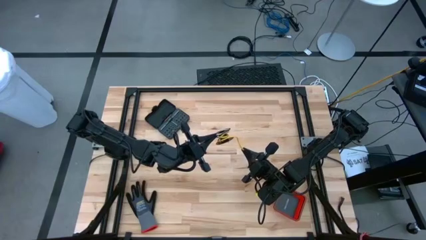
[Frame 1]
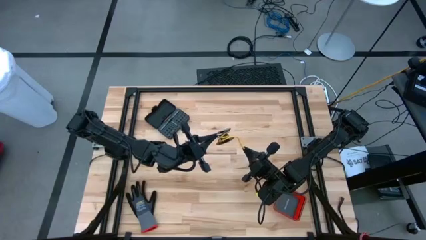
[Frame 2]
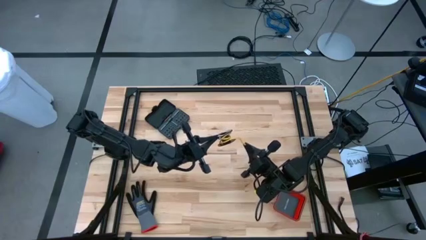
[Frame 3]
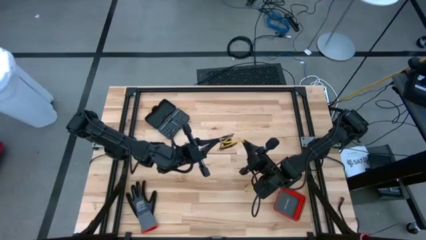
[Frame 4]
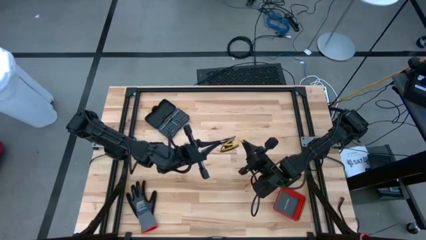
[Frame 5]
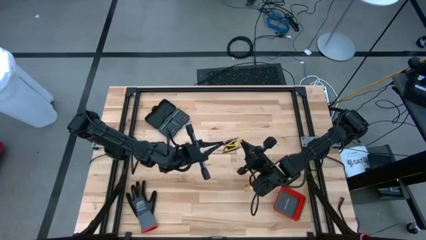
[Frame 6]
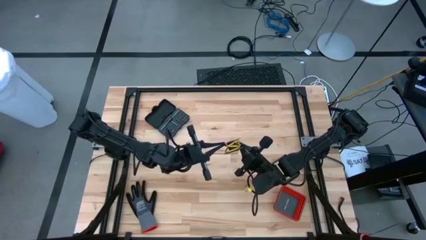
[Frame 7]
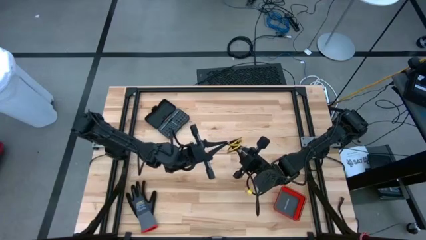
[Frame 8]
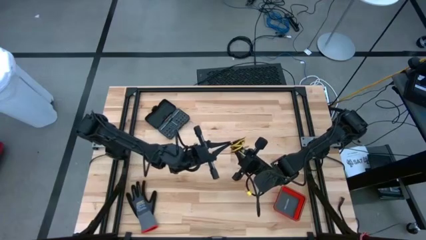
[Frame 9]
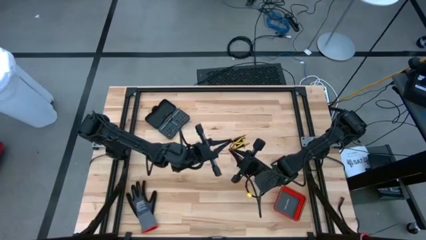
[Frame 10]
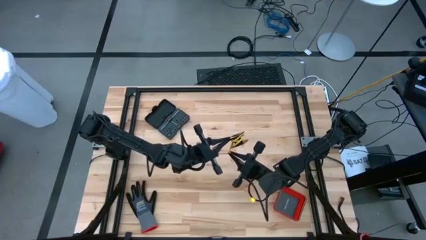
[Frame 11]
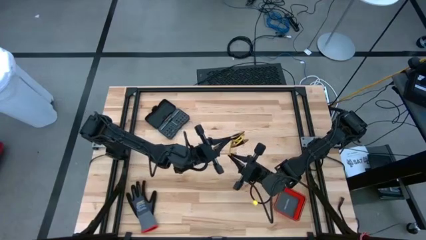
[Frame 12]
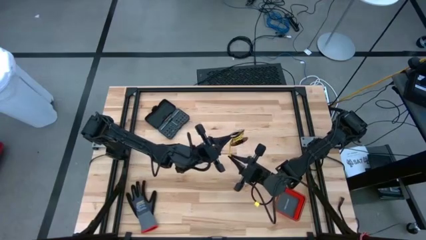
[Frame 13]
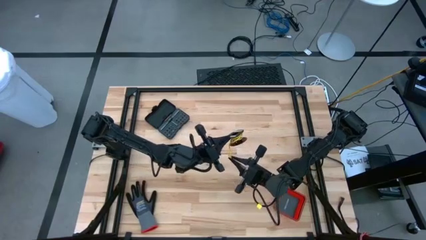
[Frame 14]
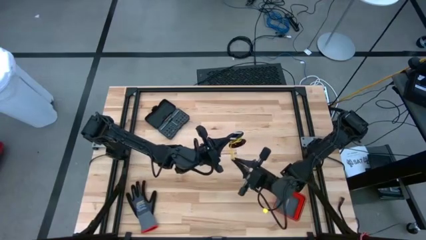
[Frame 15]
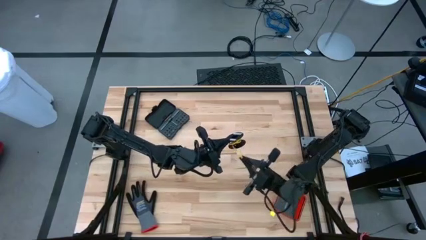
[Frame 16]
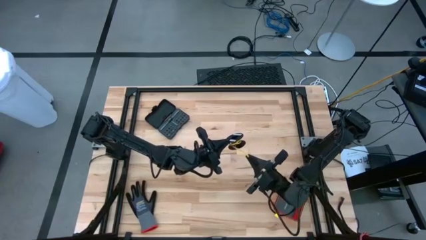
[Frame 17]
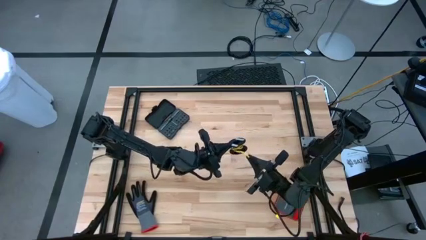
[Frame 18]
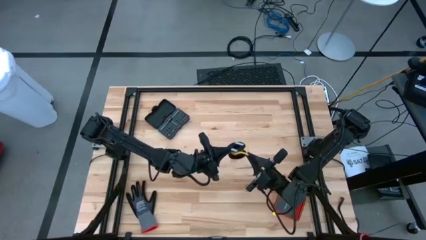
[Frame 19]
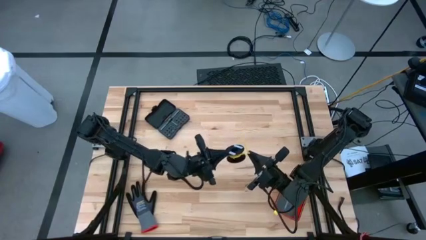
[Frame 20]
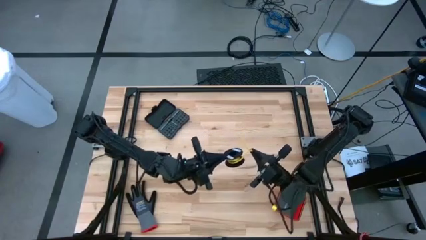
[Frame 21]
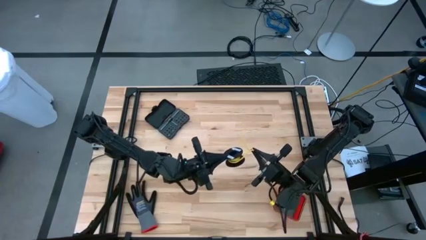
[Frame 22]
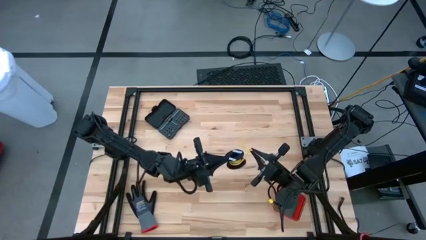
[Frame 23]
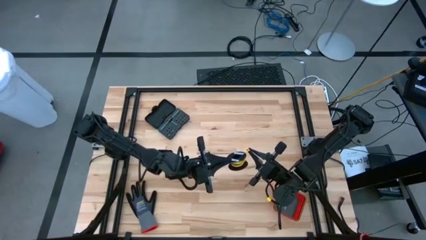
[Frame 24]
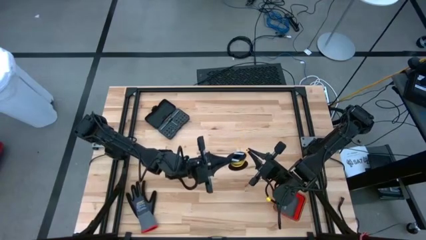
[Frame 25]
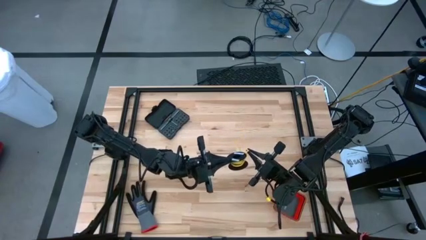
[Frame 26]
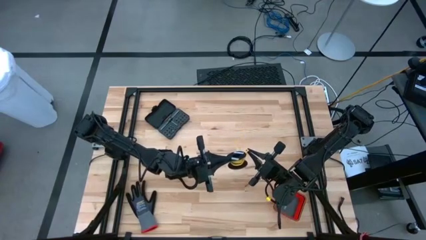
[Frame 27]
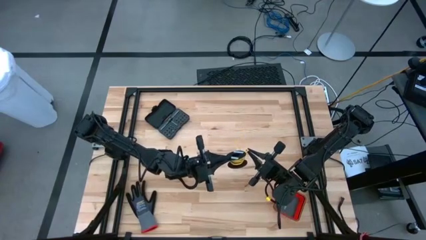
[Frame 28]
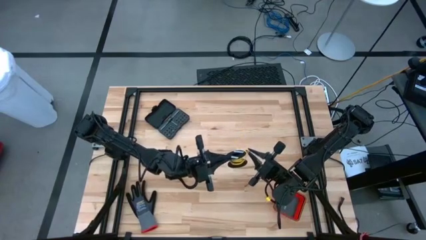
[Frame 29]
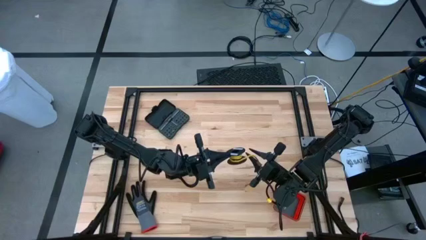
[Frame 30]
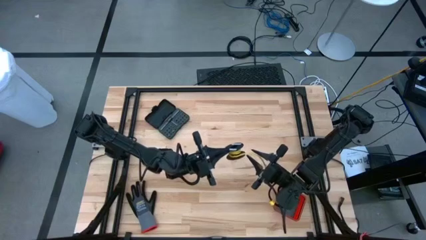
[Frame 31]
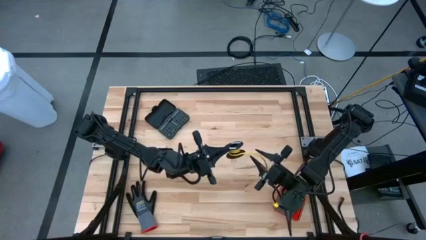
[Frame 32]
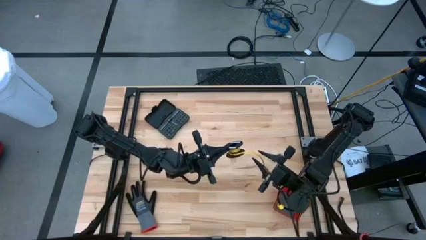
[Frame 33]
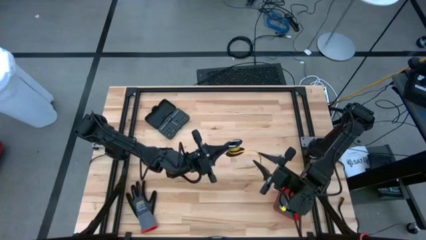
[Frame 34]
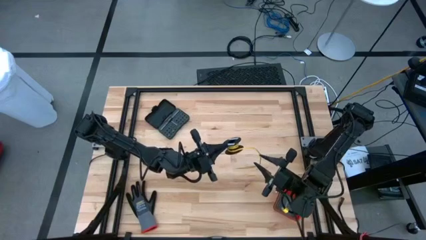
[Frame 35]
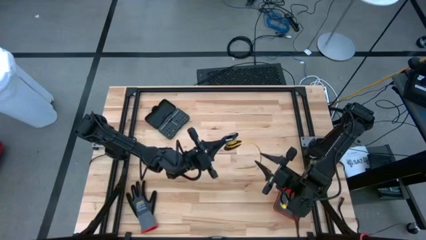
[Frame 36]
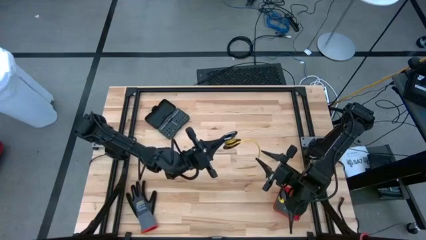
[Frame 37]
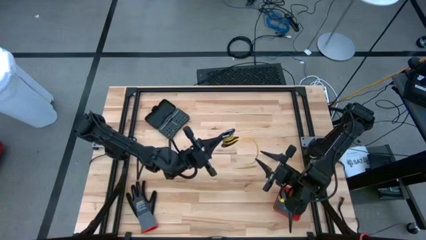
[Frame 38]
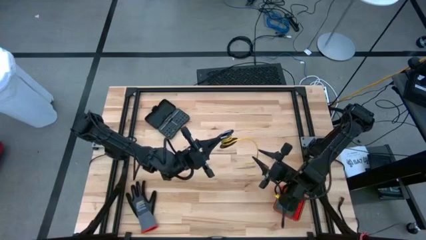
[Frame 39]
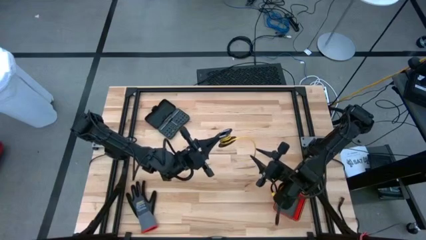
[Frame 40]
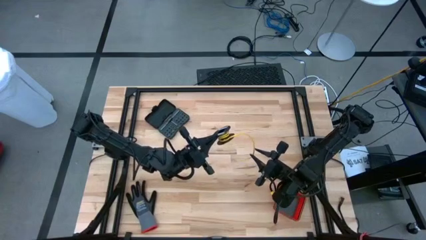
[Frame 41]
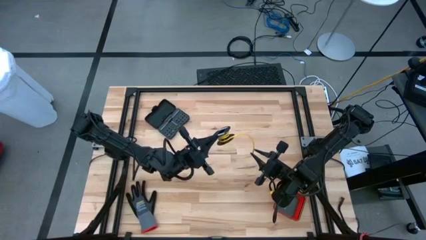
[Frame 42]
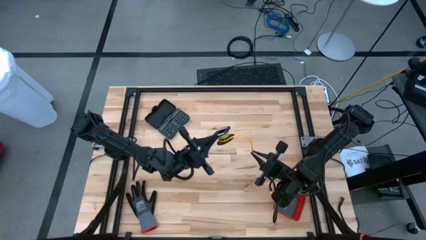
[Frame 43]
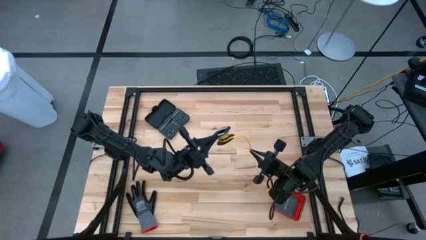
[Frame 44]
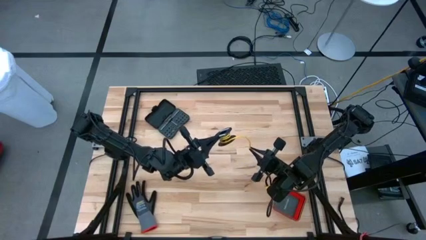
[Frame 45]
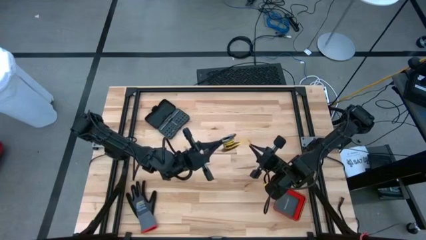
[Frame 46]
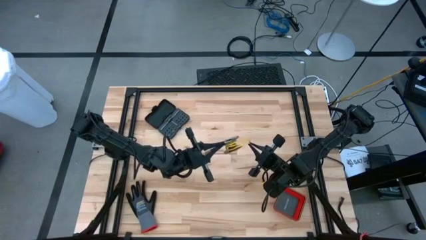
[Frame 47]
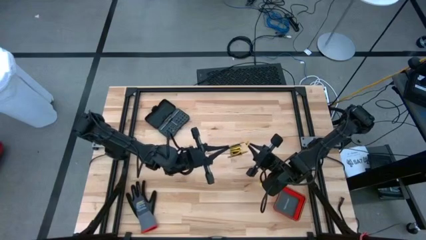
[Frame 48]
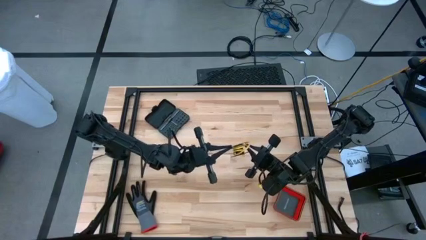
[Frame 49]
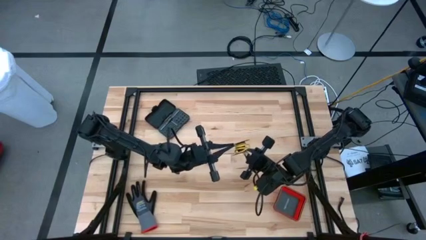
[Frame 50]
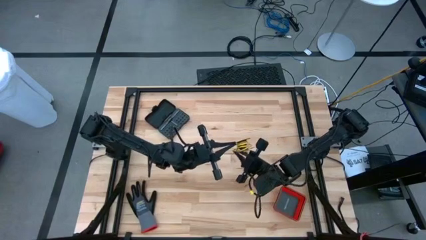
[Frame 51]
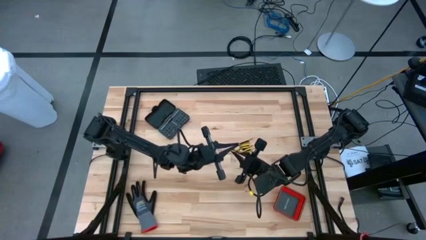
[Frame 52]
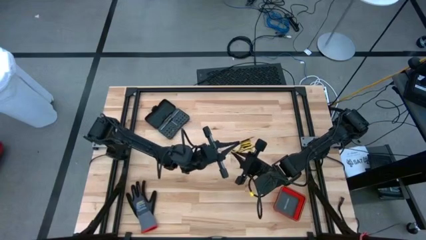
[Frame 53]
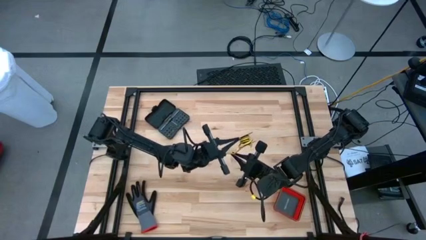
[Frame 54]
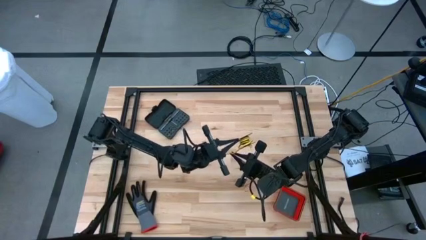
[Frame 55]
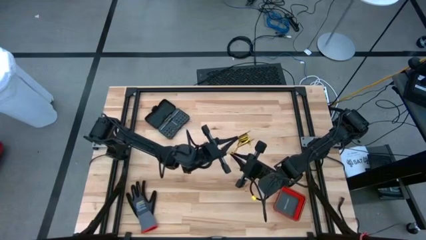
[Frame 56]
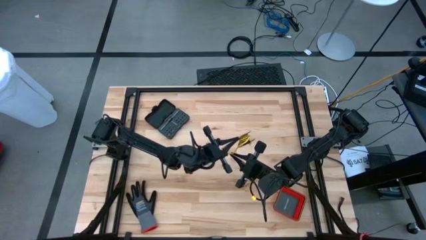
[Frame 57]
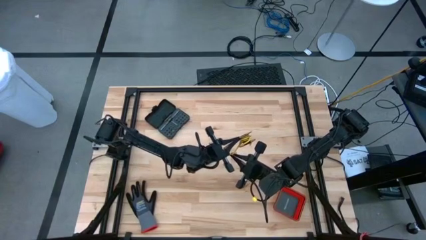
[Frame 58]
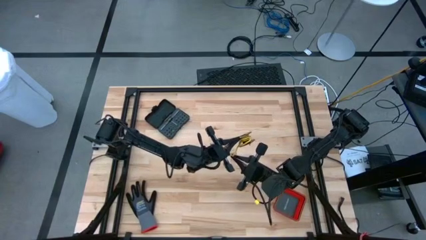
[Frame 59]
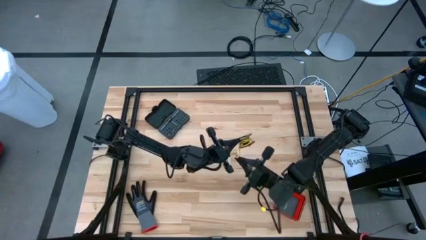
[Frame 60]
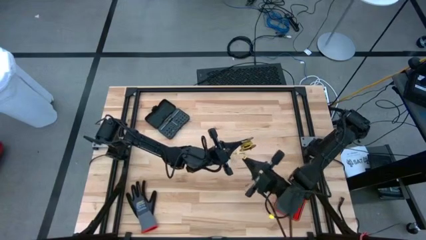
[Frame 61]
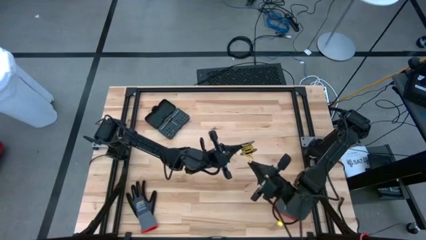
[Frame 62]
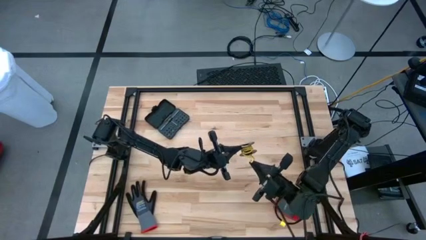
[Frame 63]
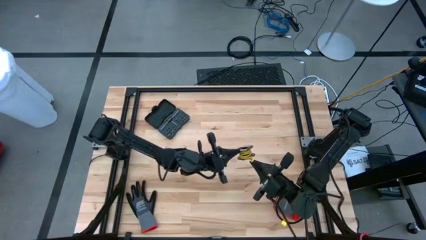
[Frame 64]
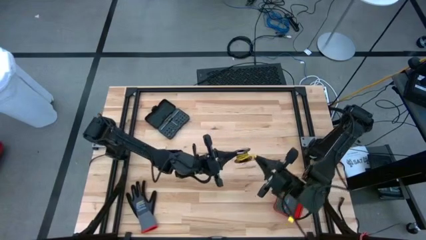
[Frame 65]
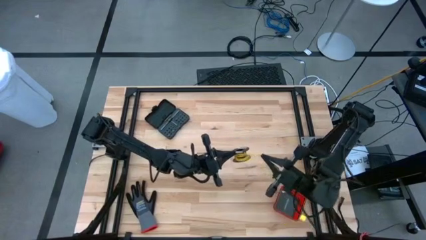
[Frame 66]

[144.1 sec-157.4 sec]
Task: Coil cords
Coil the yellow wire onto the spool

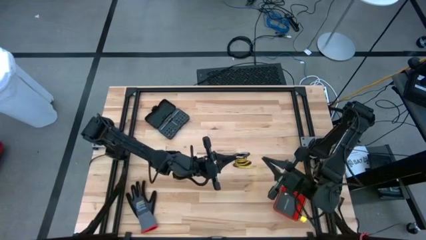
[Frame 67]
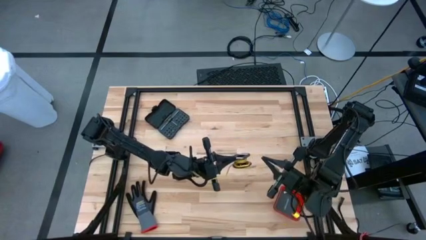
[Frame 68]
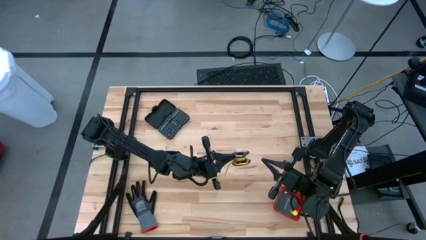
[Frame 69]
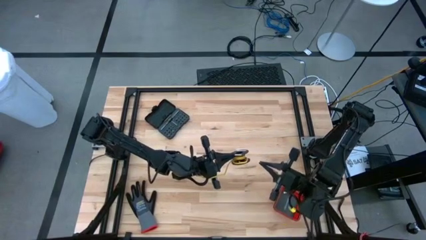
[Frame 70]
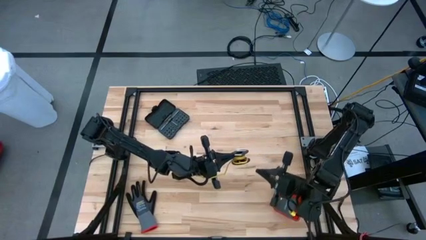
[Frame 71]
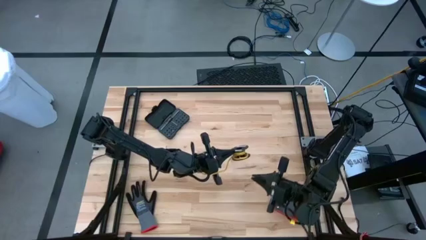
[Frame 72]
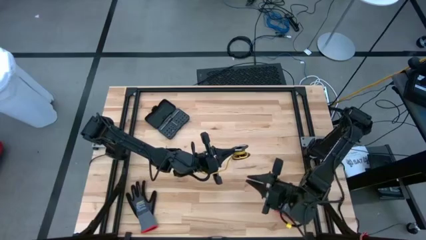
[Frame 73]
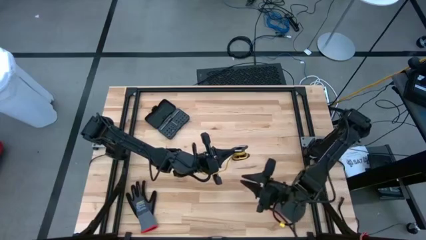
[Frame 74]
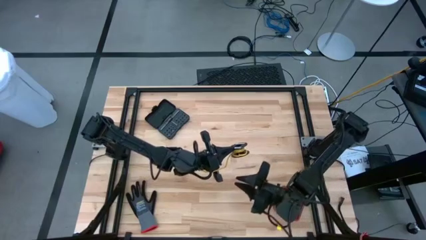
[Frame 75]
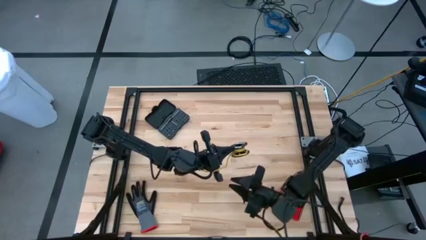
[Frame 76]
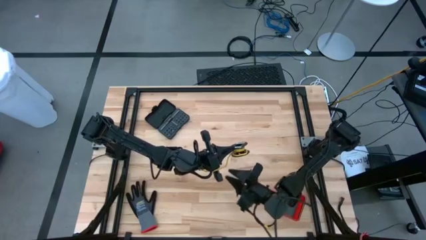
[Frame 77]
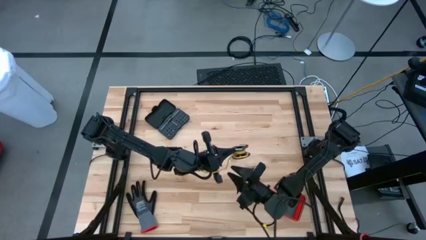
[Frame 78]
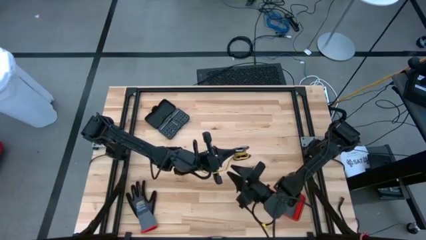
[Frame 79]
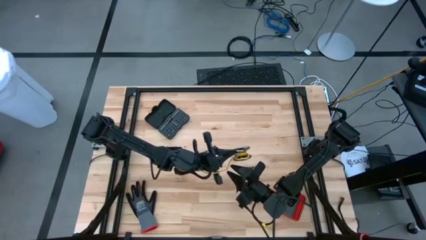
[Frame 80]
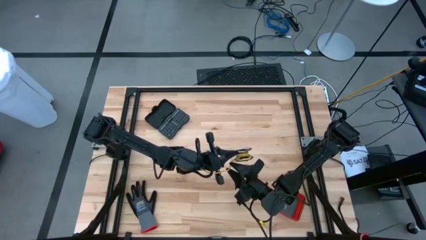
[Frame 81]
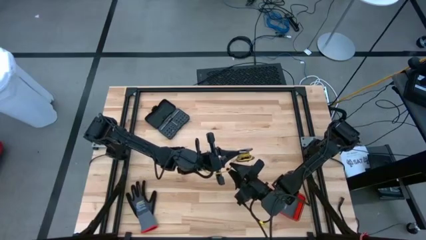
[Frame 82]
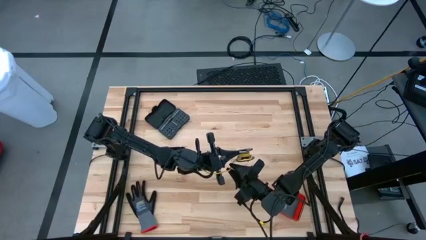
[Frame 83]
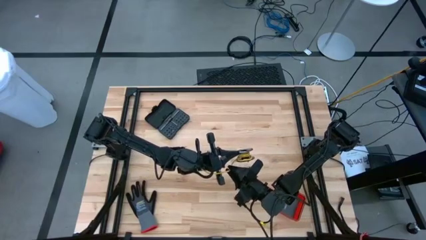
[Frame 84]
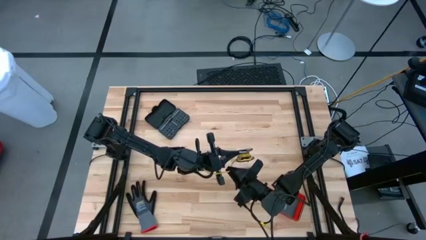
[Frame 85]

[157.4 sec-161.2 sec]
Coil the yellow wire onto the spool
